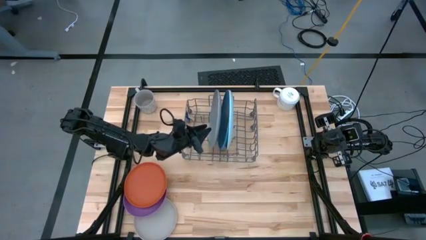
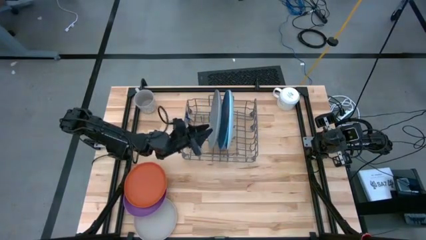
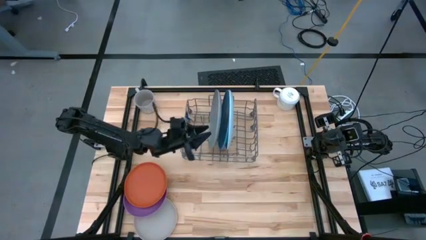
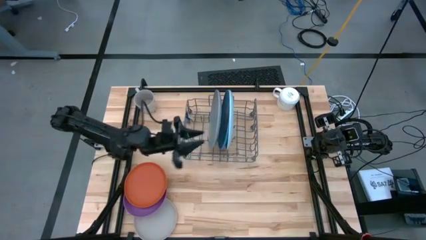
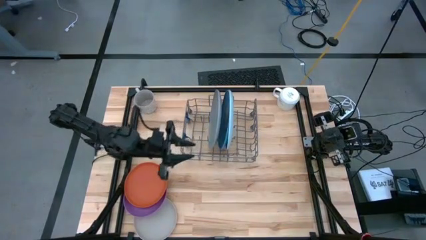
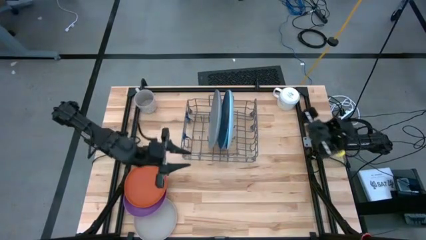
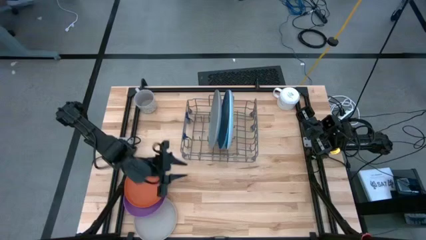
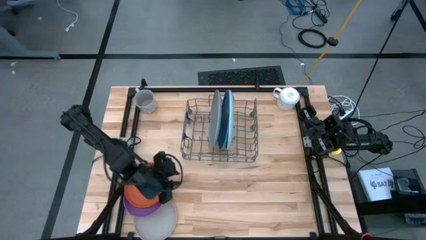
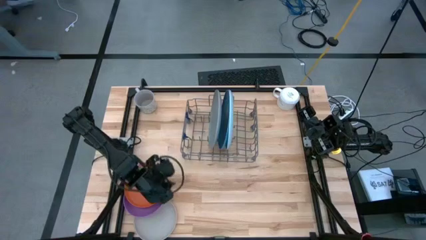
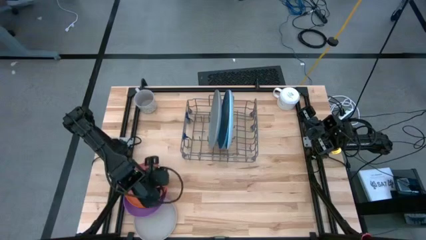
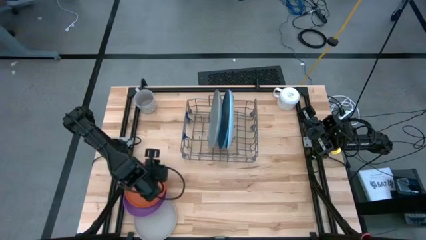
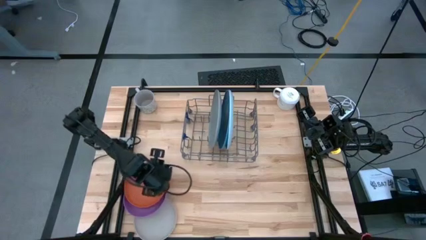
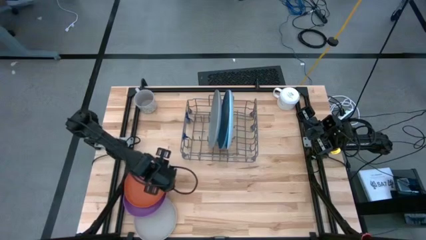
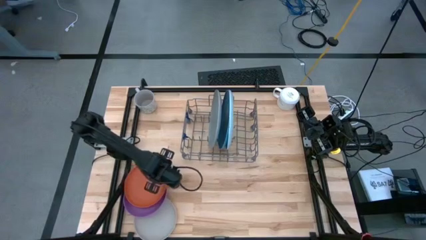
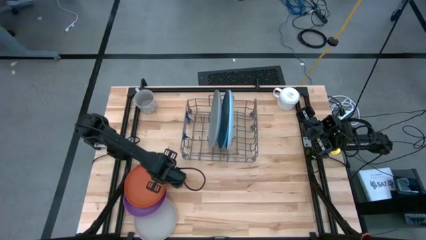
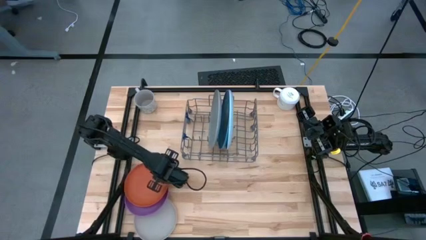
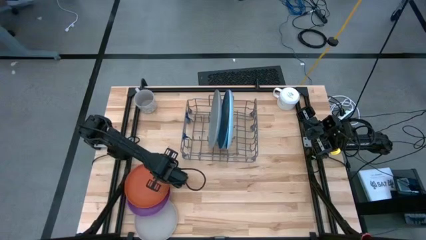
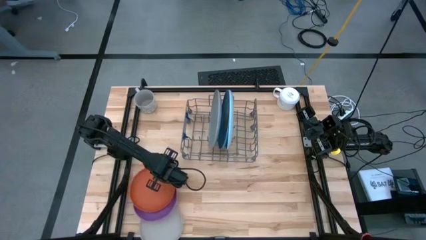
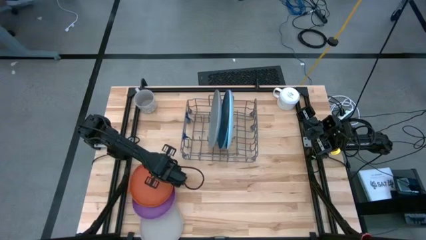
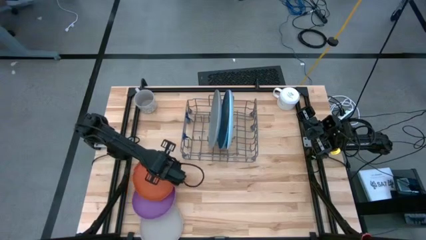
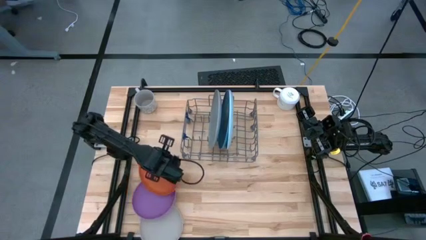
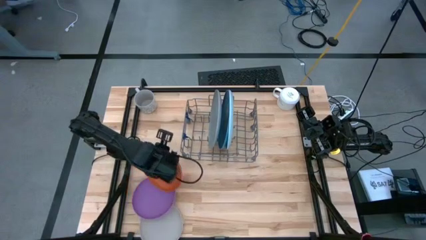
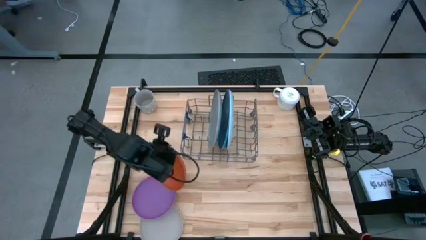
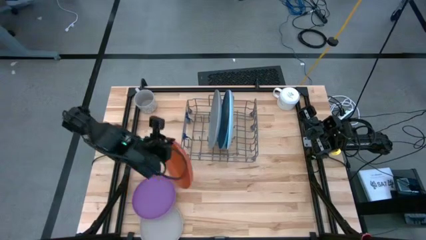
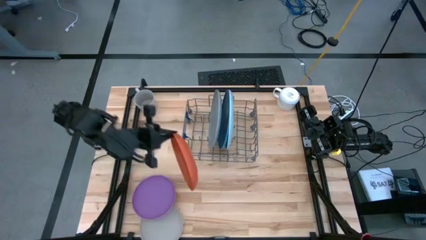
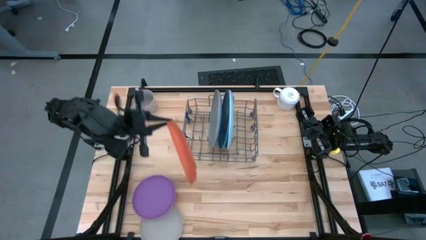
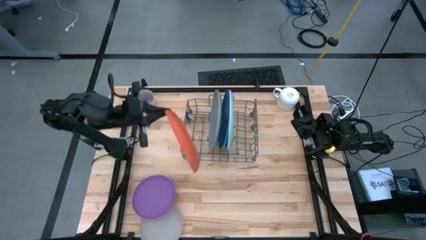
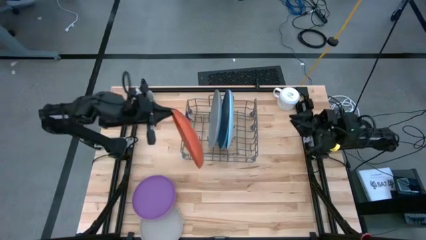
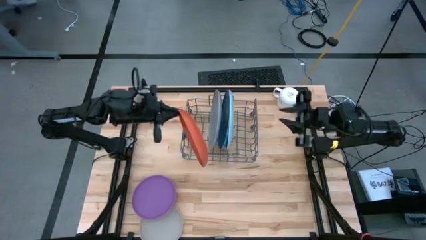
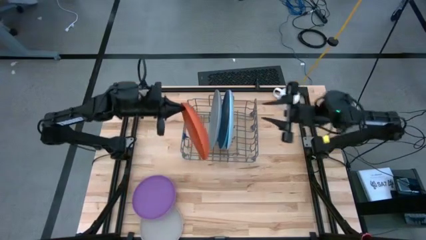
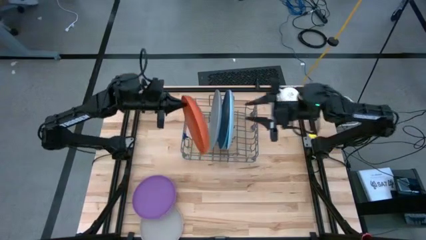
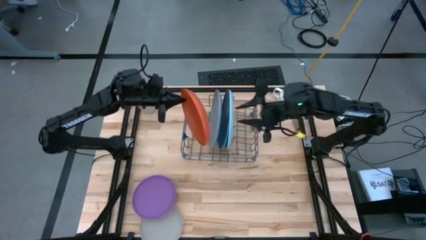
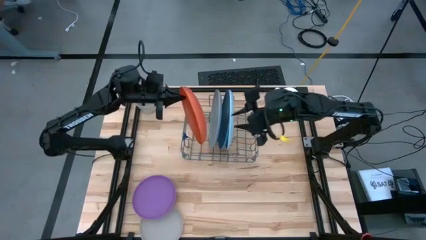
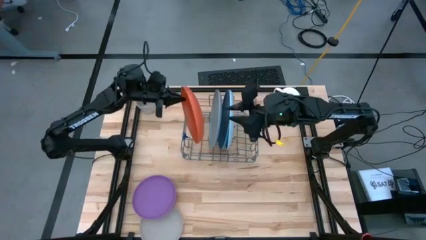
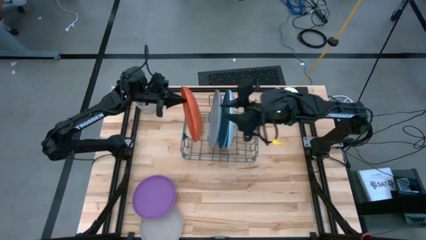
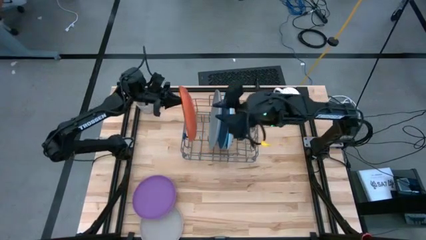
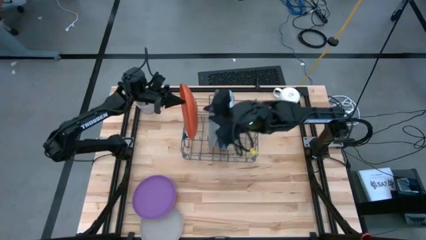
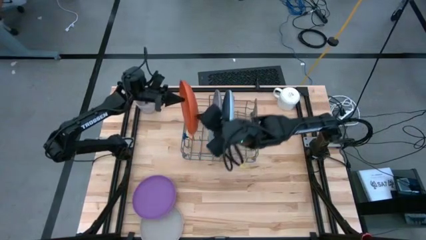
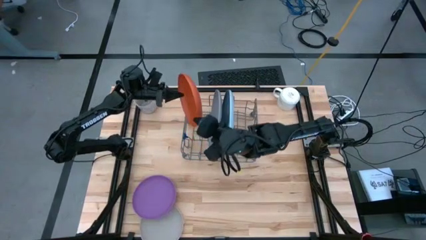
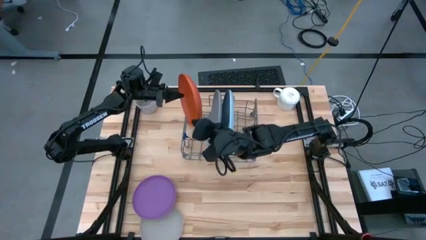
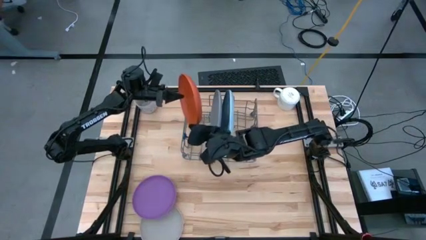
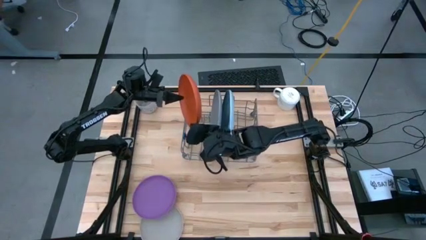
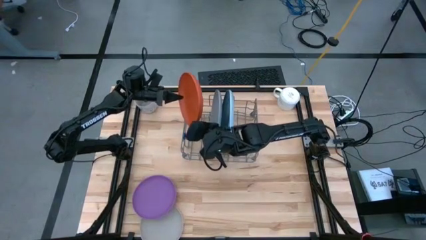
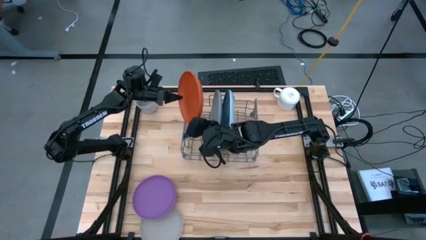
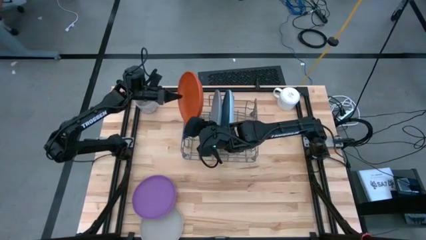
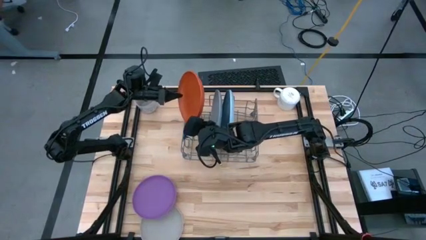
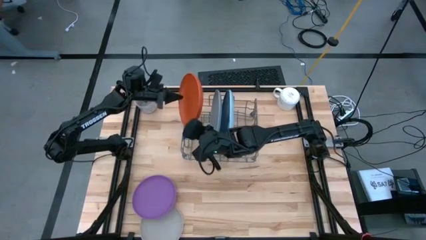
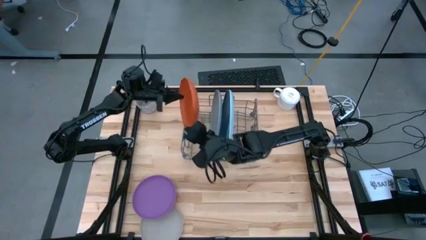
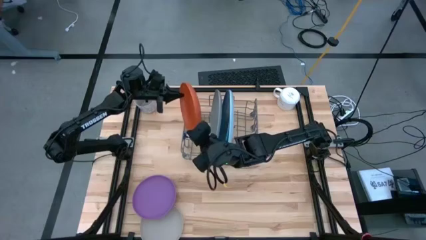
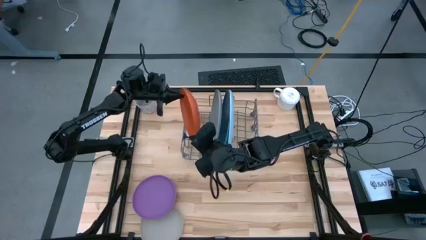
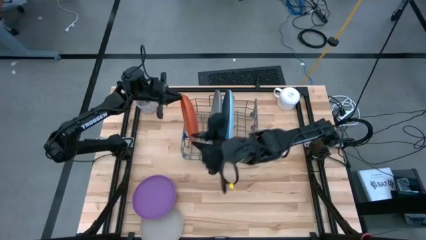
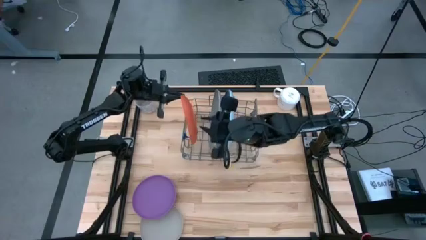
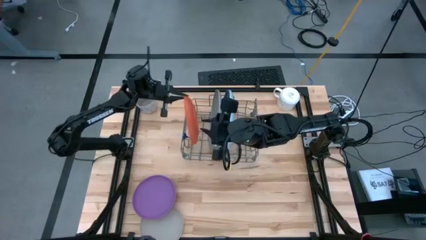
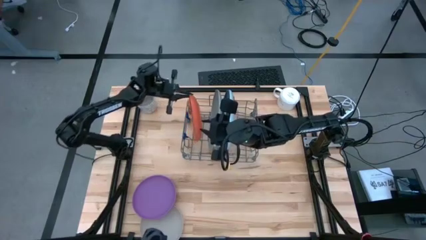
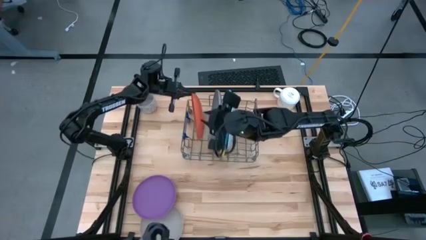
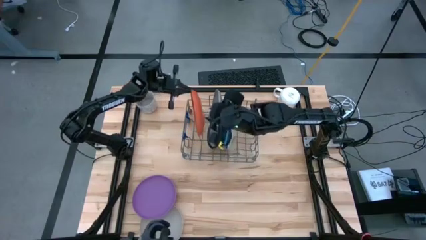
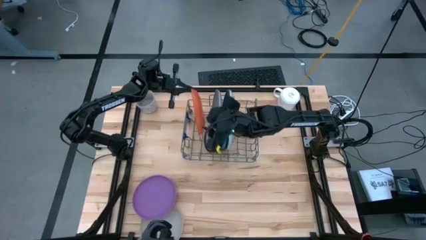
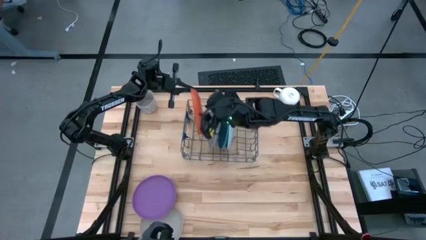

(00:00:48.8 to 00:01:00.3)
Task: Sort dishes
Put the orange plate in the dish rack

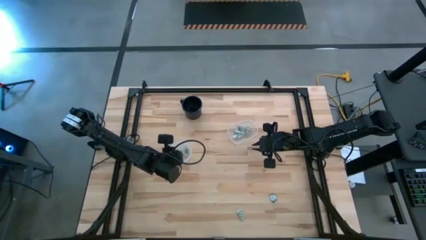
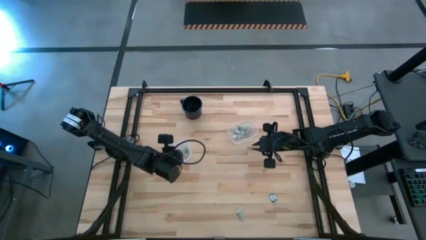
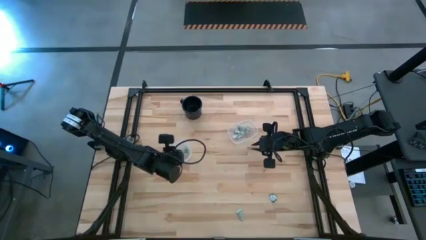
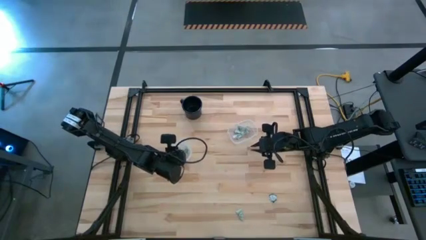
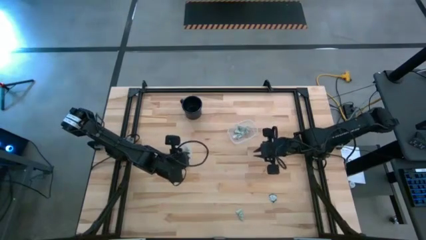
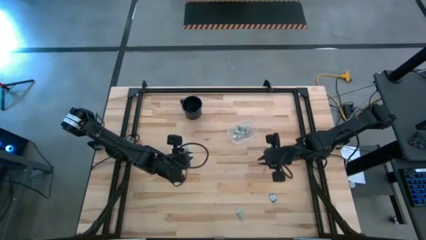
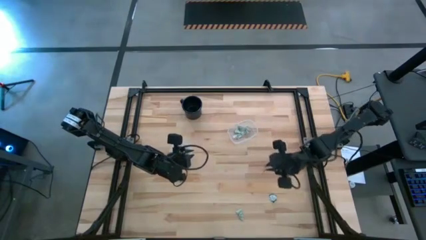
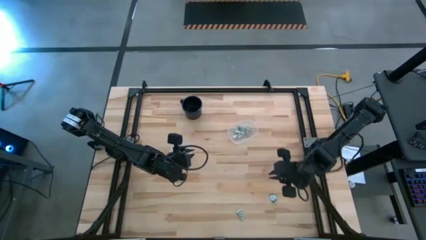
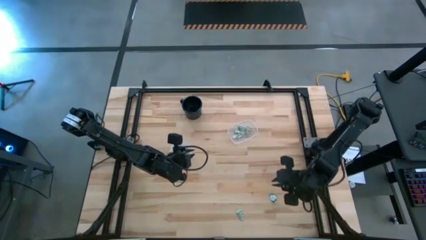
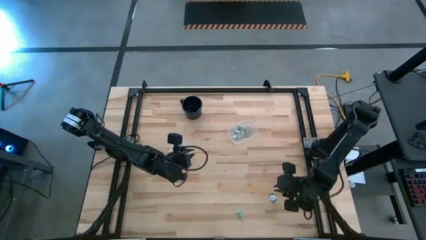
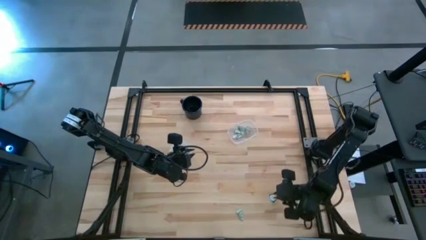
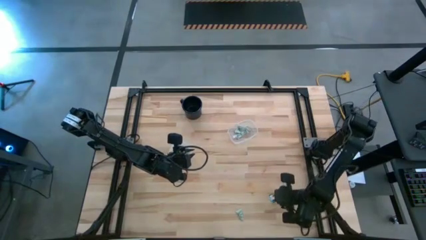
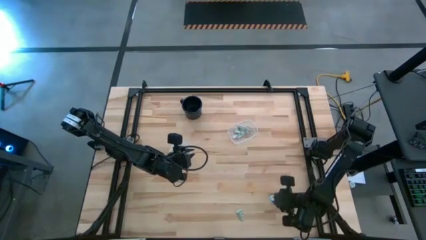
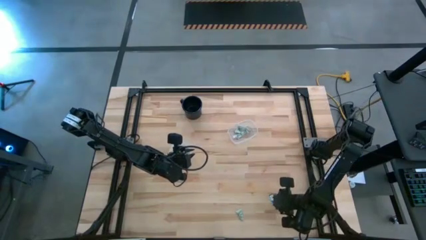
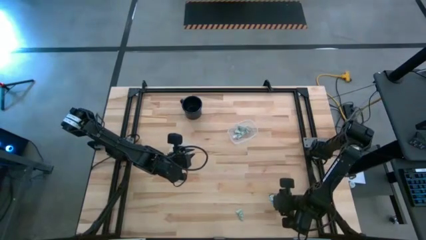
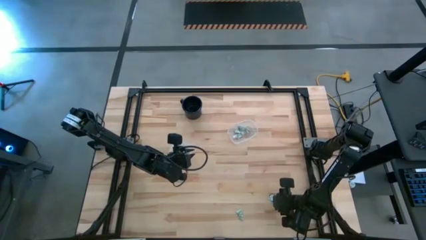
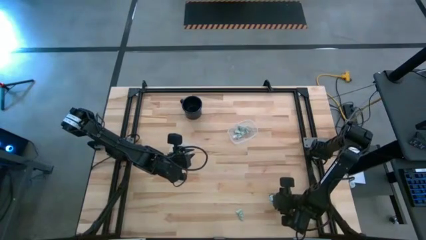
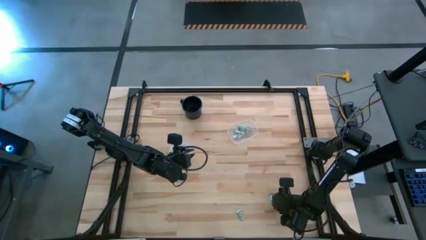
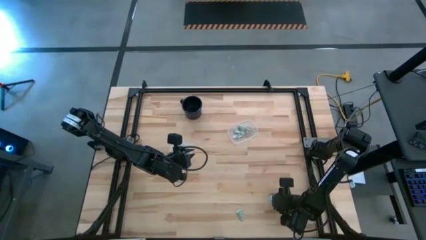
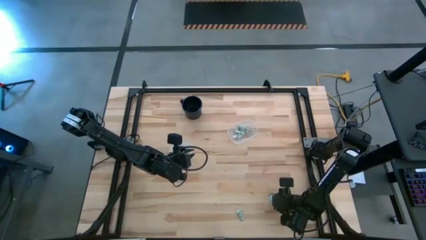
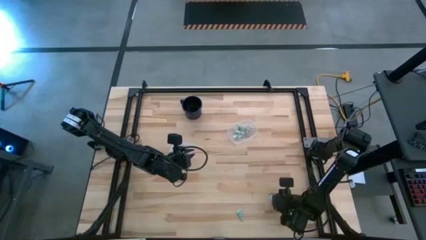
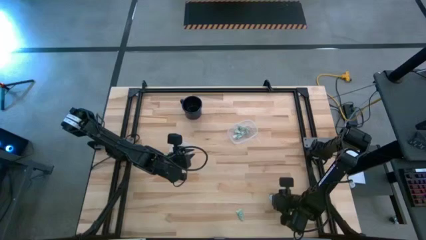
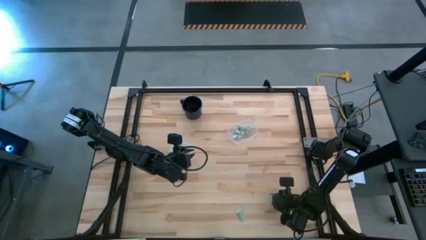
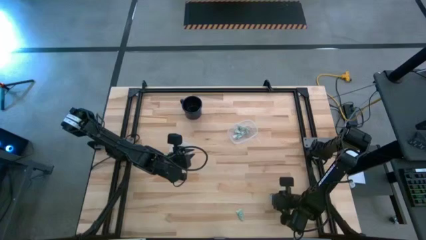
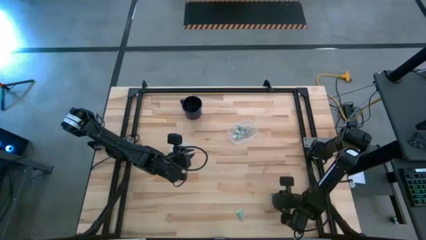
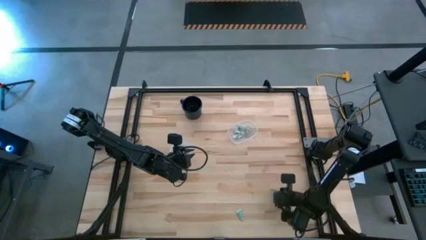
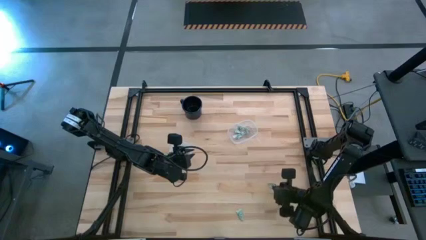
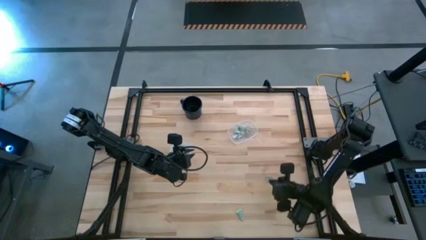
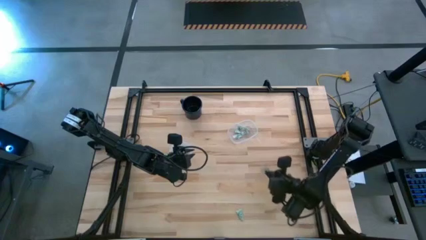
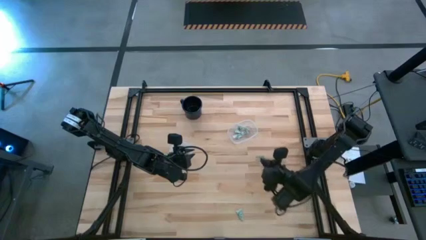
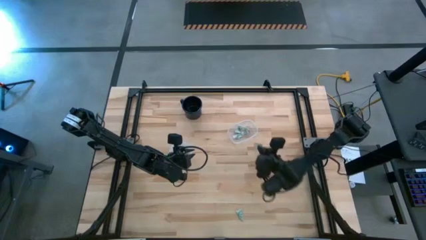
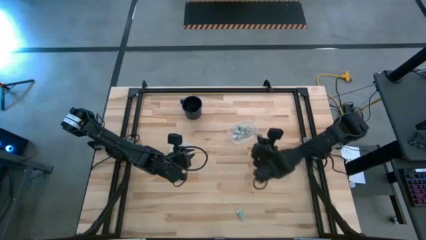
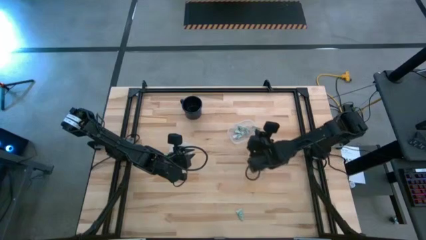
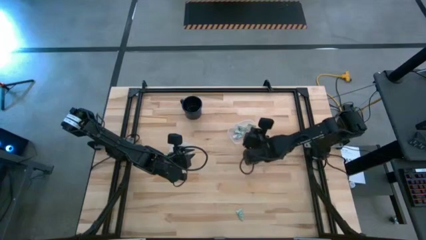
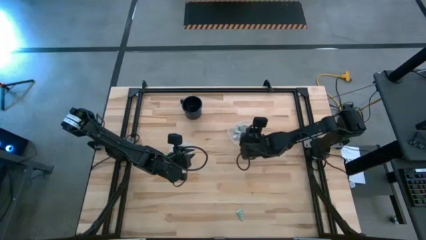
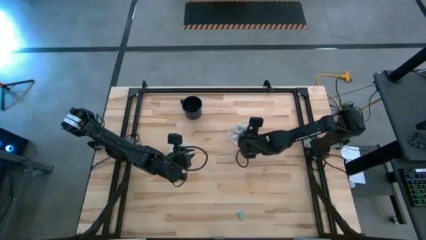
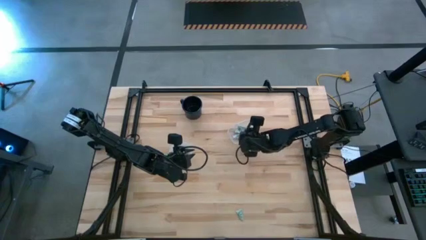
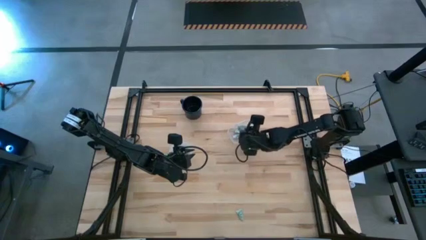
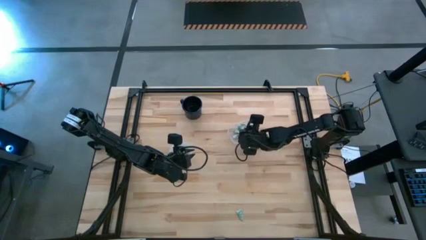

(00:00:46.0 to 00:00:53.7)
Task: Pick and place items into bin
Put the truvia packet into the rectangle transparent bin
